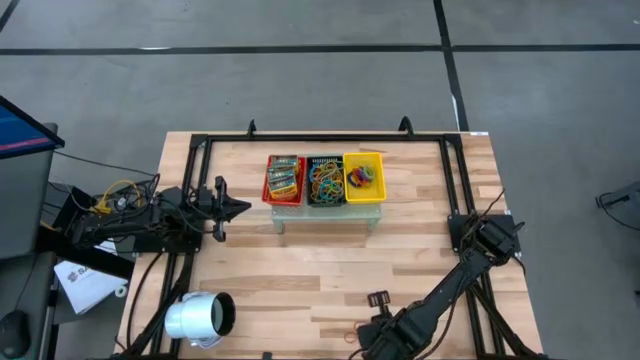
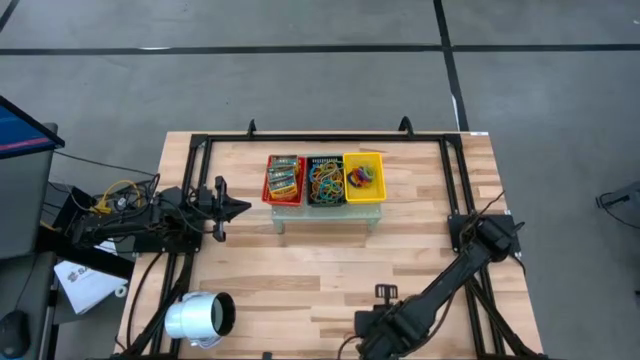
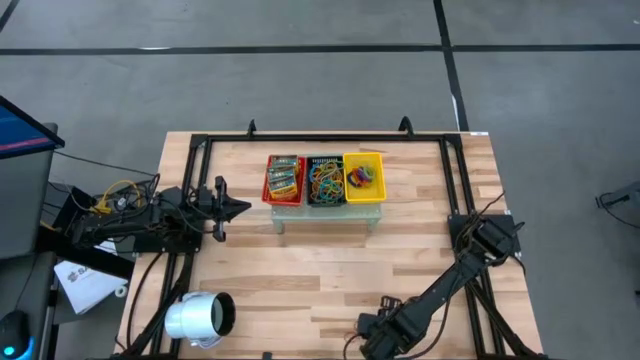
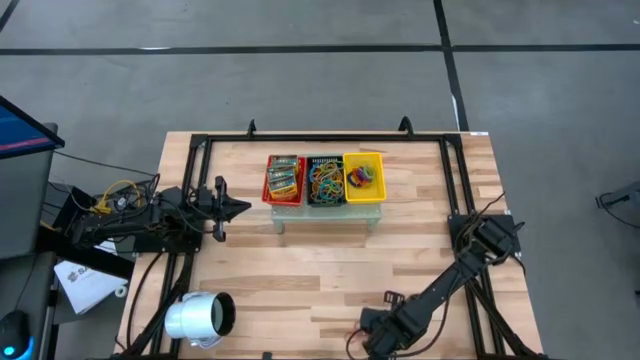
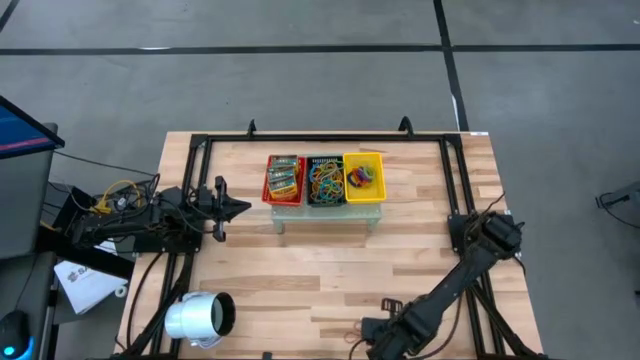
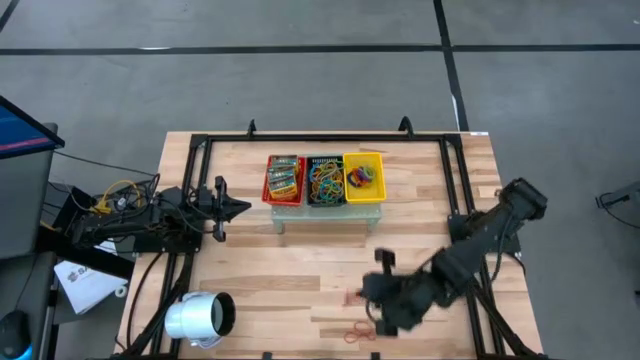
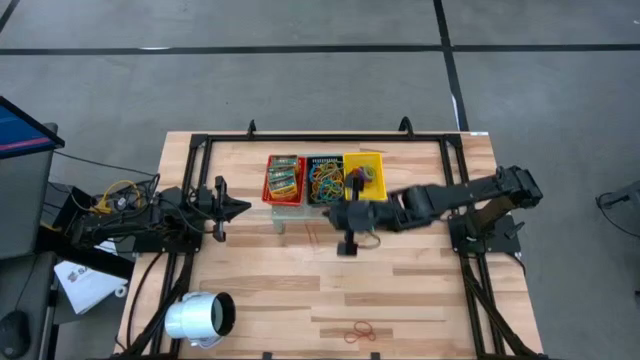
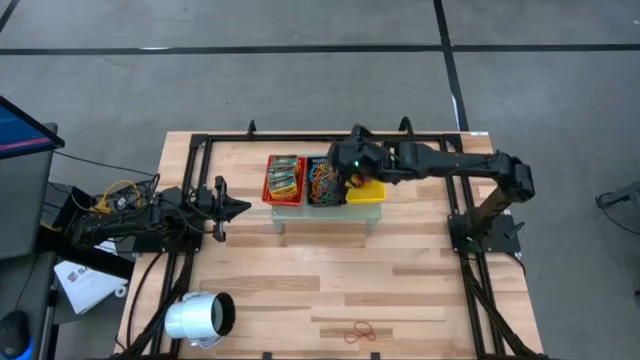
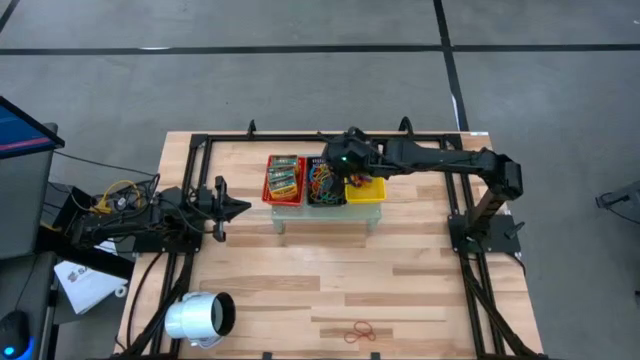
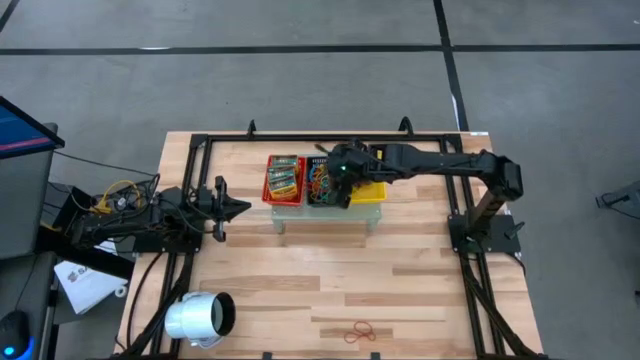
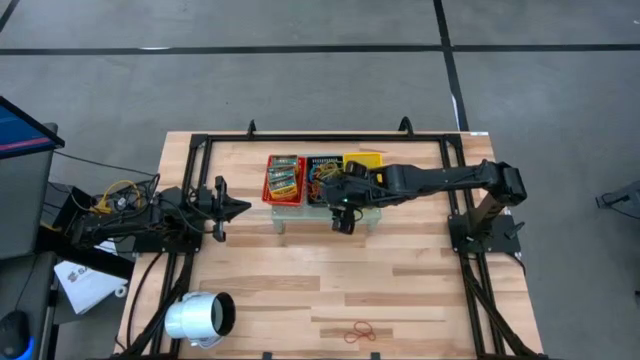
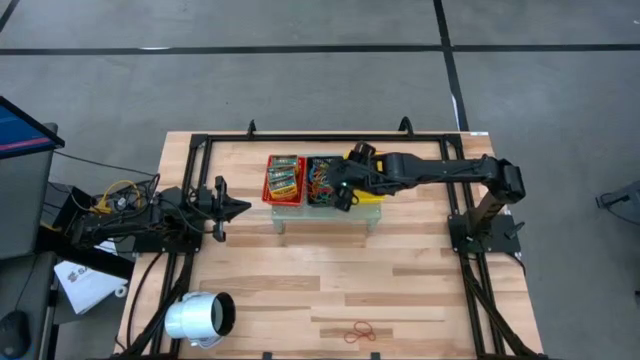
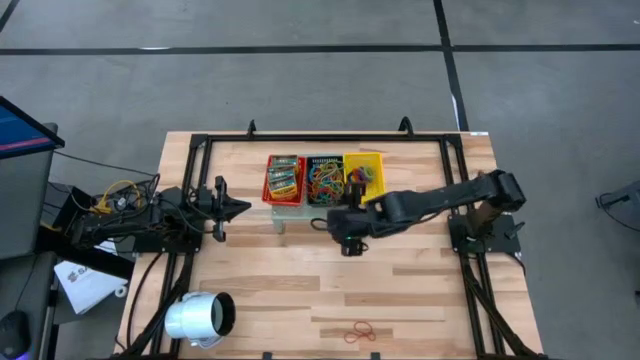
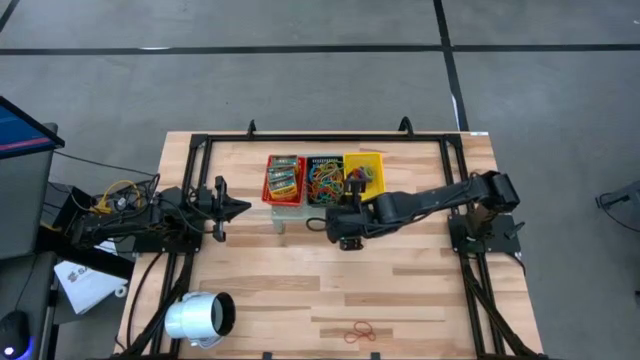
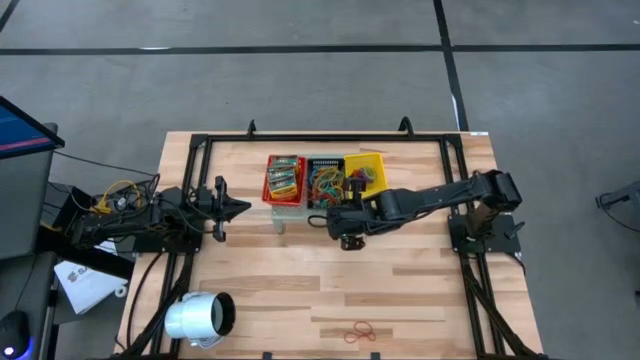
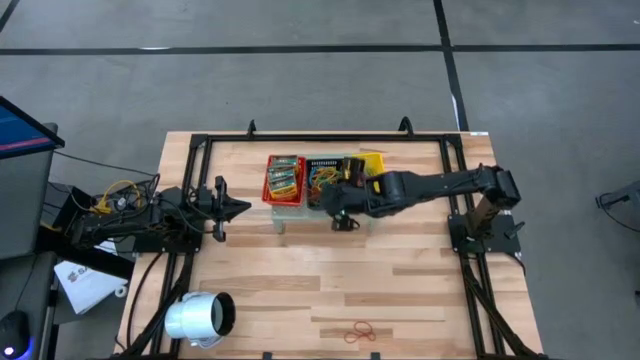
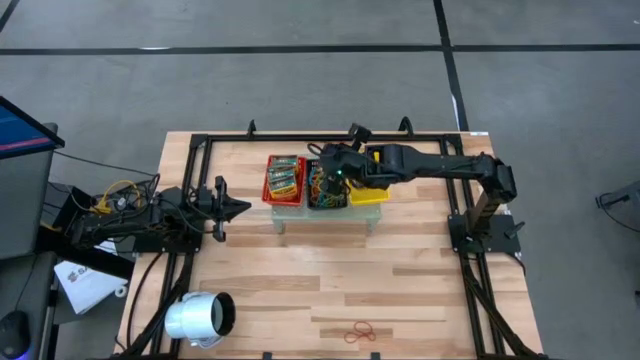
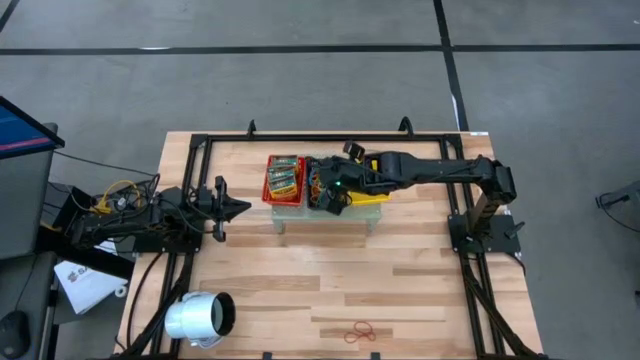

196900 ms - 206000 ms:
Task: Pick & Place Office Desk Supplies
Put the red rubber band into the black bin on the shelf

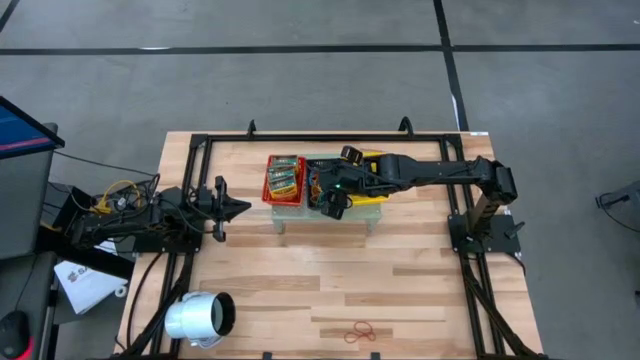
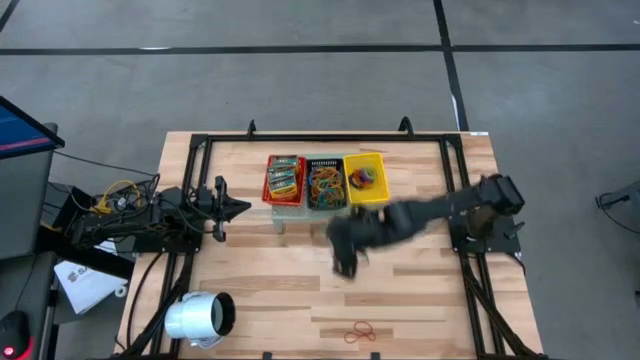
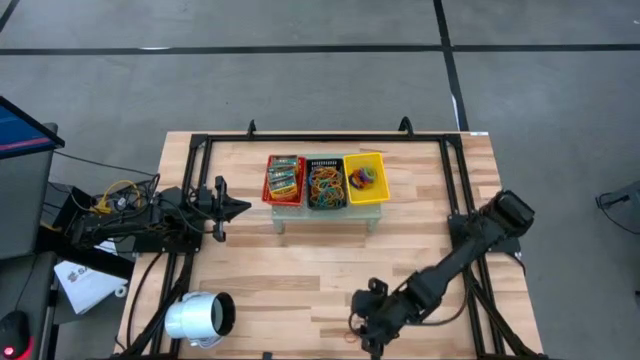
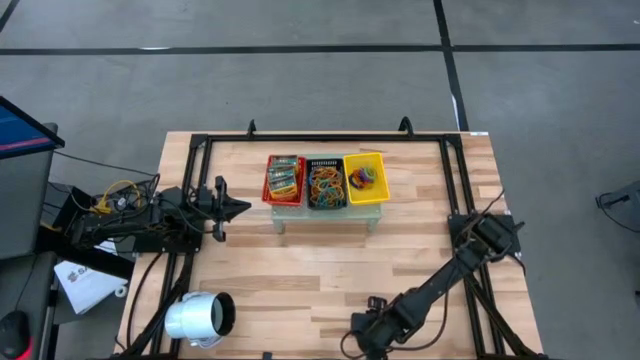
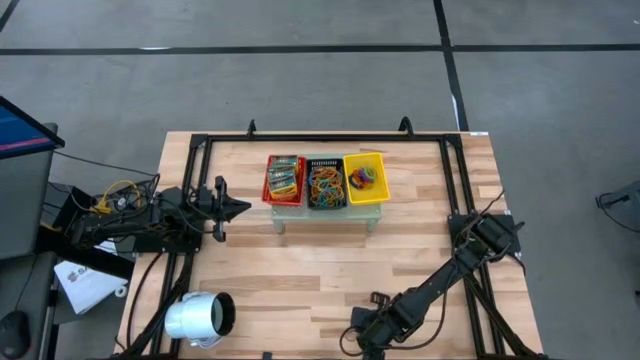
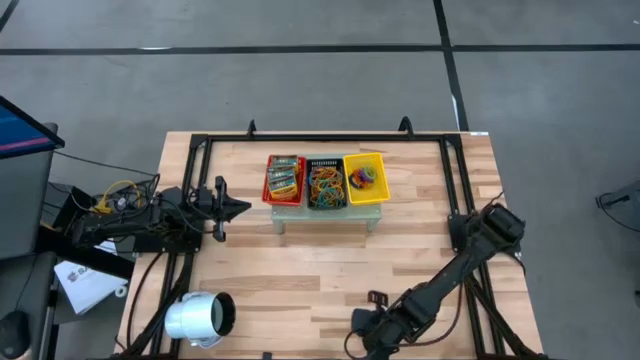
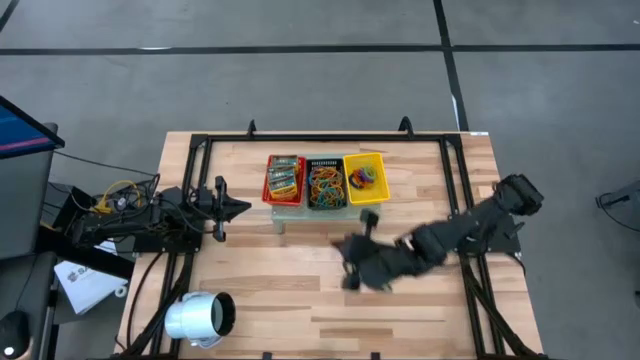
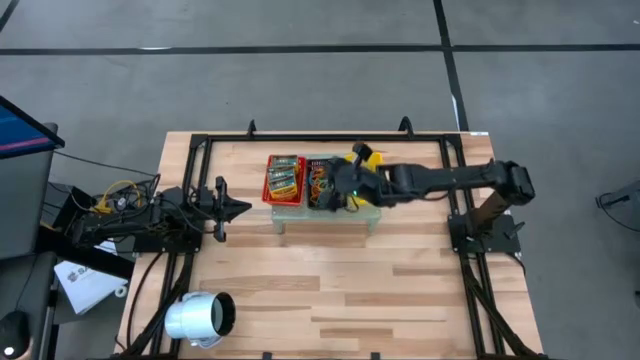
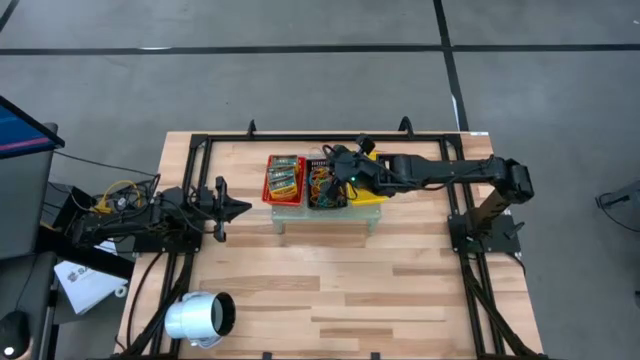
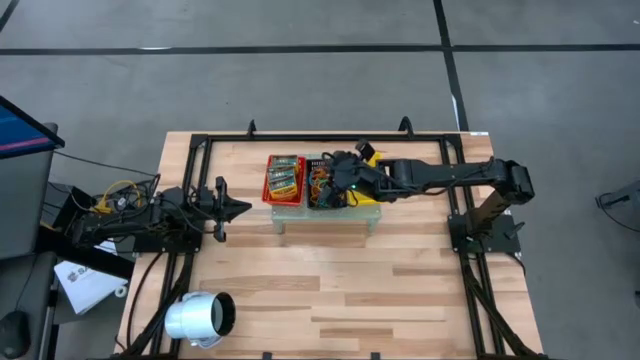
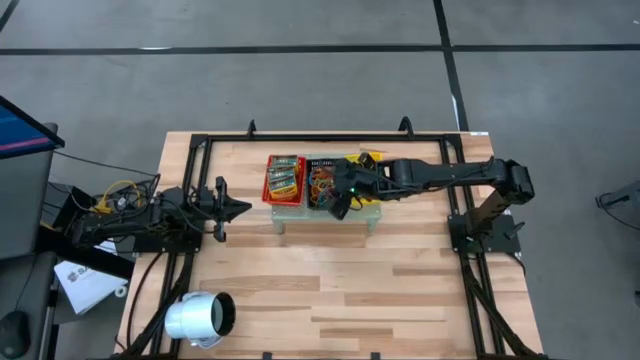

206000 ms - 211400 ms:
Put the red rubber band into the black bin on the shelf

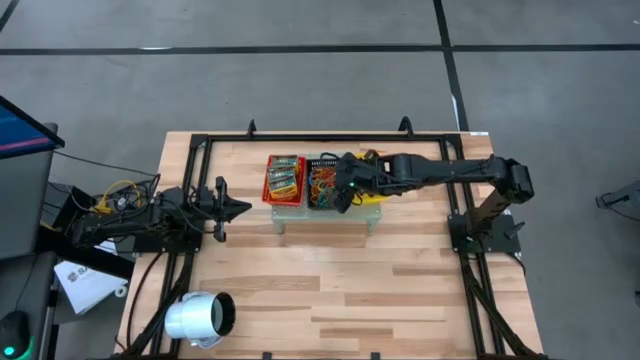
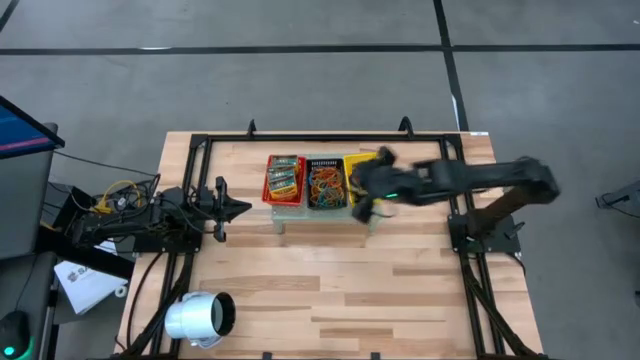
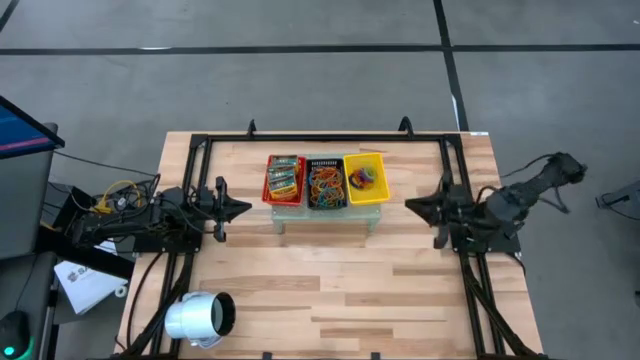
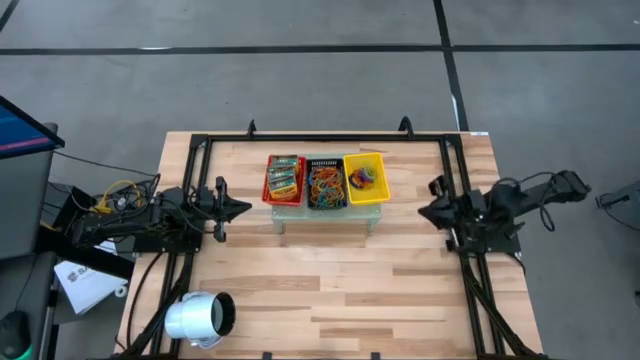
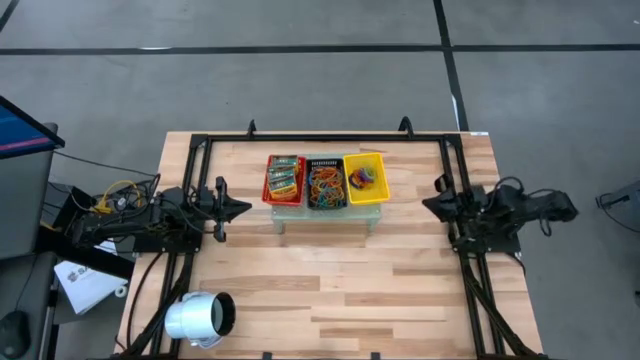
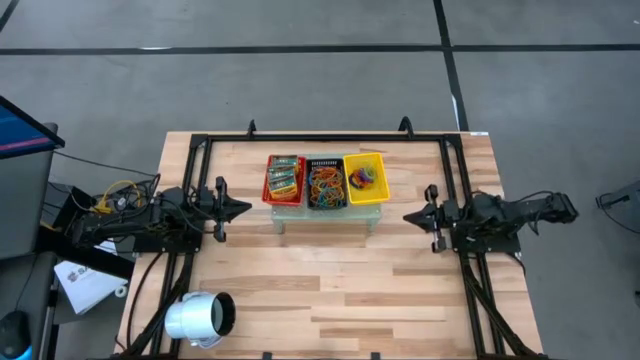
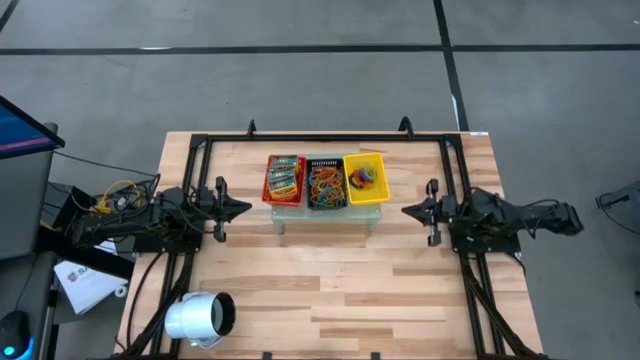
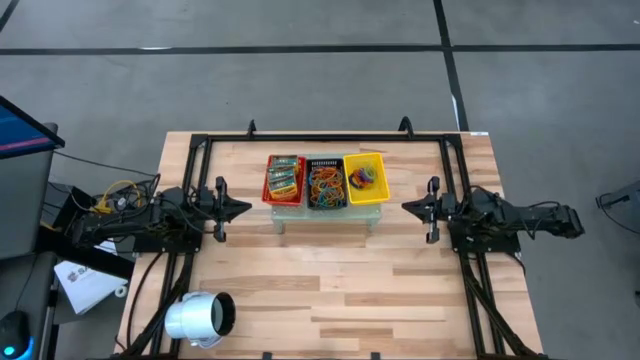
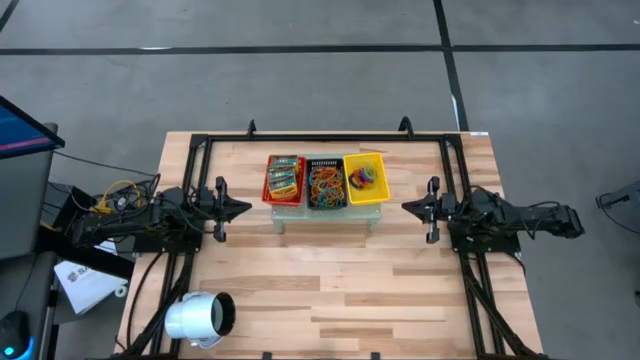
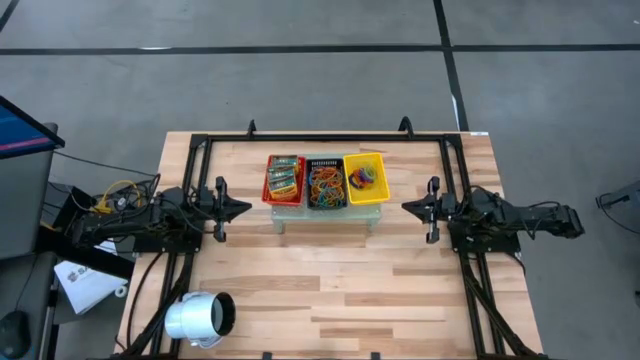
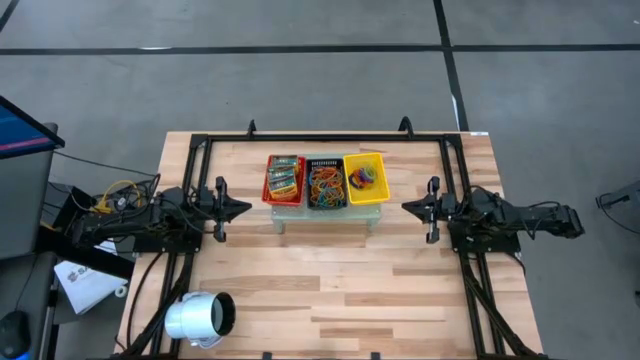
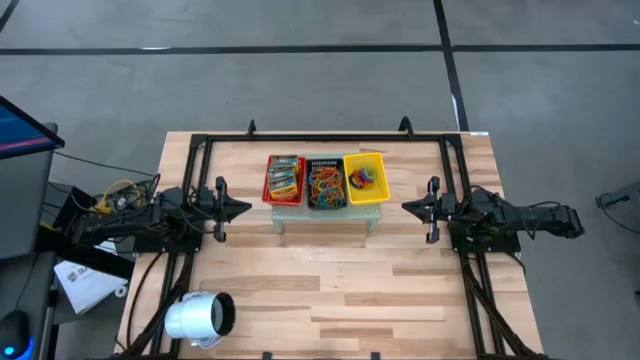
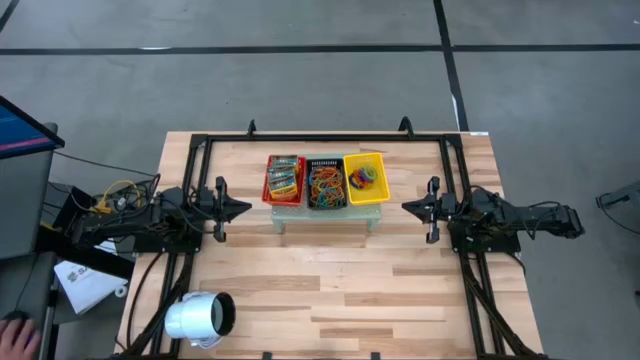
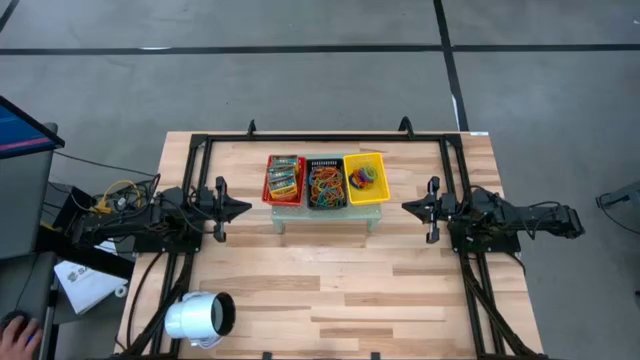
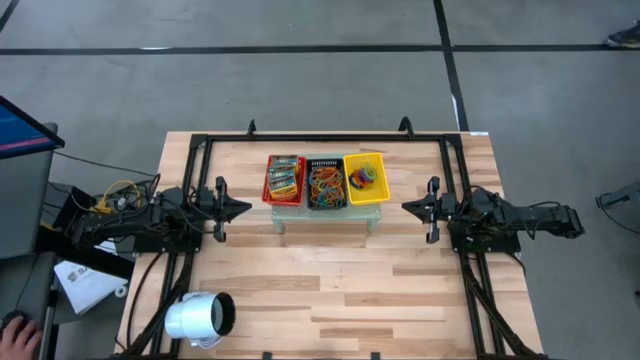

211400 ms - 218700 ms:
Return to Home Position

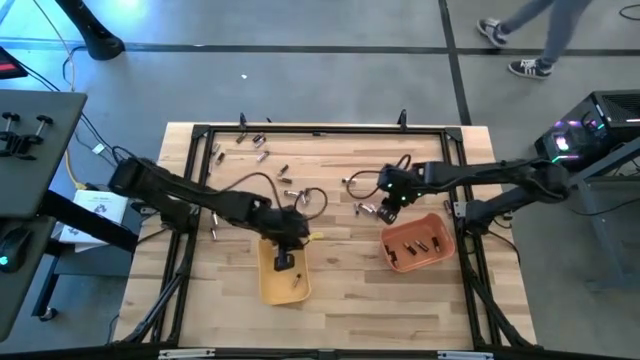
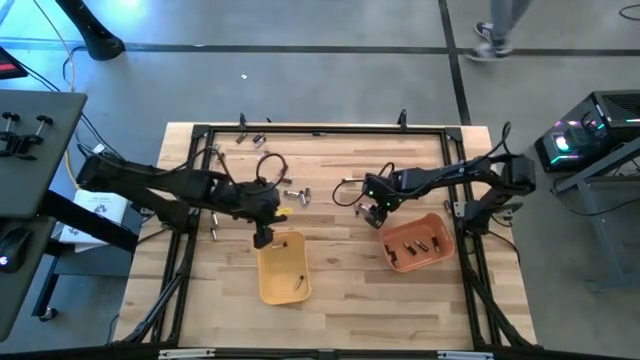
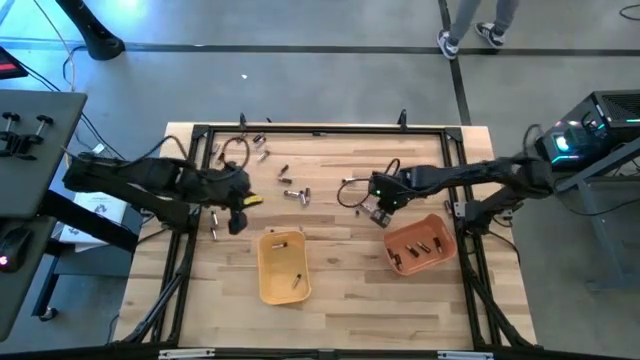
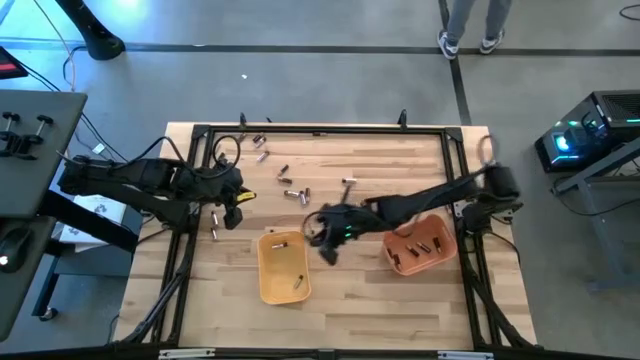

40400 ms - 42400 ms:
Task: Sort batteries
Put the silver battery into the yellow bin
